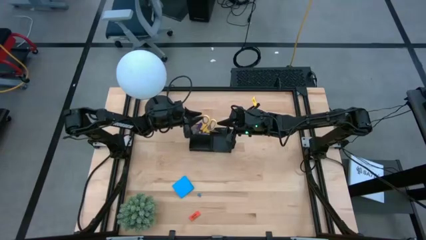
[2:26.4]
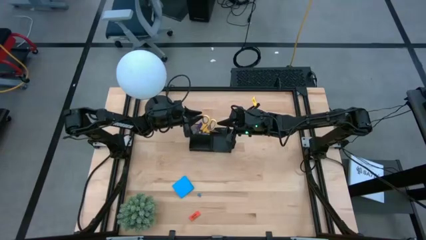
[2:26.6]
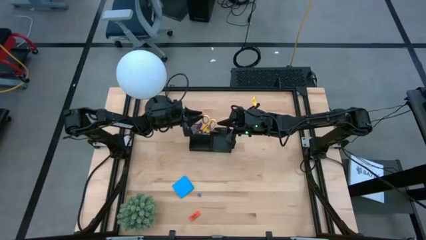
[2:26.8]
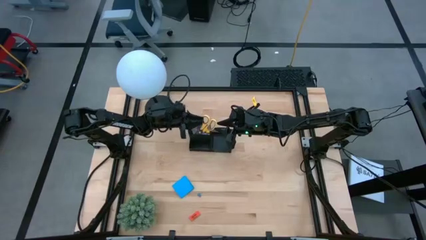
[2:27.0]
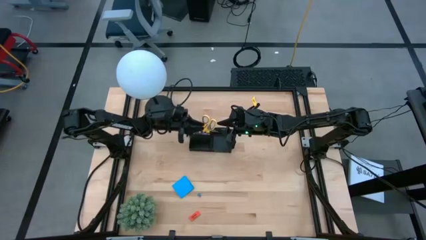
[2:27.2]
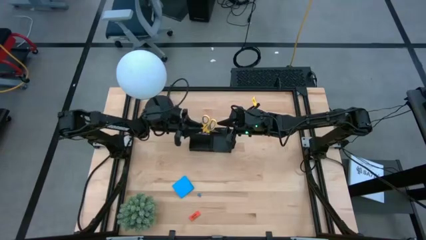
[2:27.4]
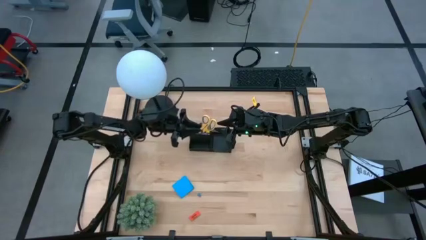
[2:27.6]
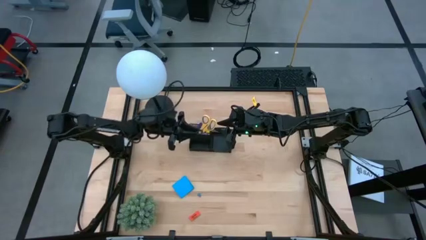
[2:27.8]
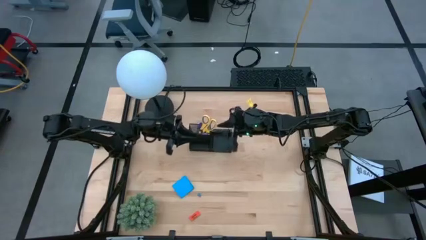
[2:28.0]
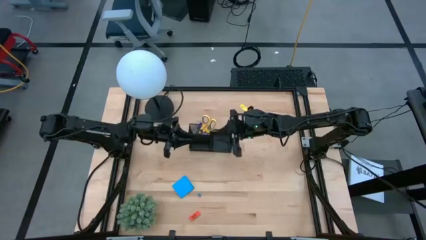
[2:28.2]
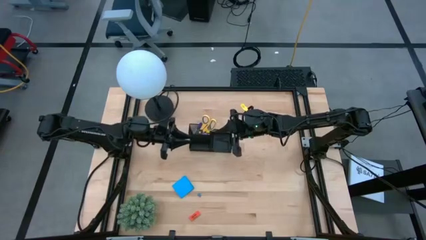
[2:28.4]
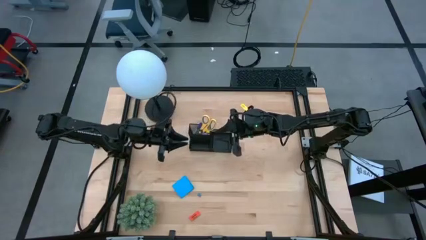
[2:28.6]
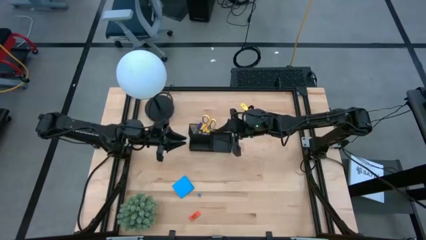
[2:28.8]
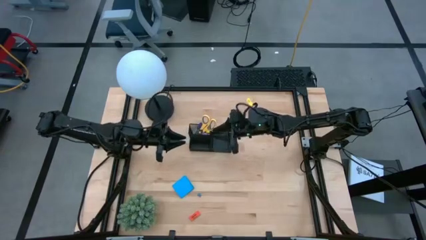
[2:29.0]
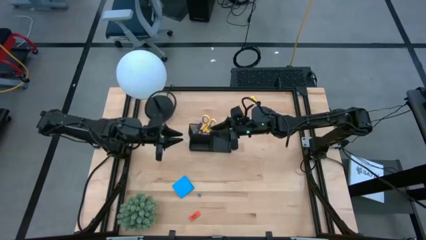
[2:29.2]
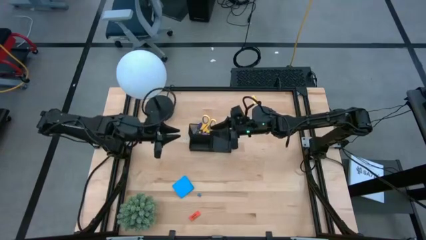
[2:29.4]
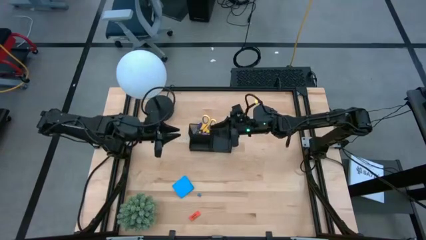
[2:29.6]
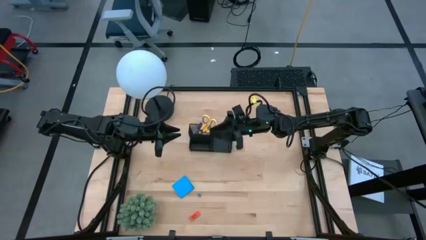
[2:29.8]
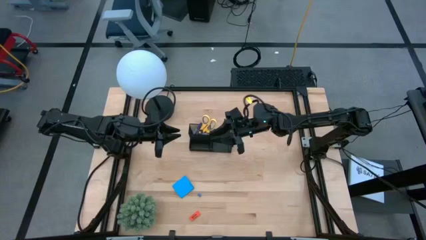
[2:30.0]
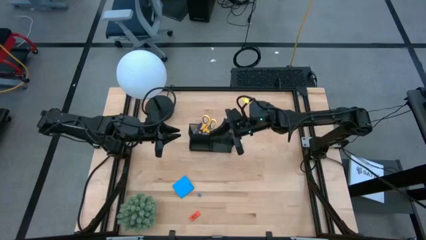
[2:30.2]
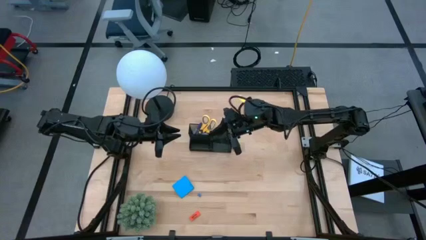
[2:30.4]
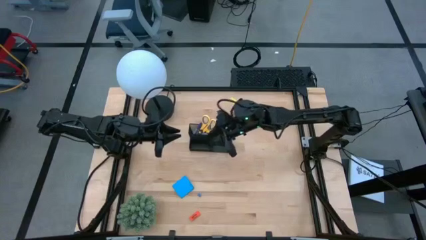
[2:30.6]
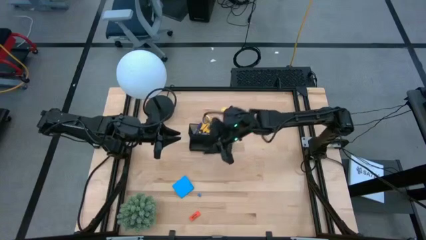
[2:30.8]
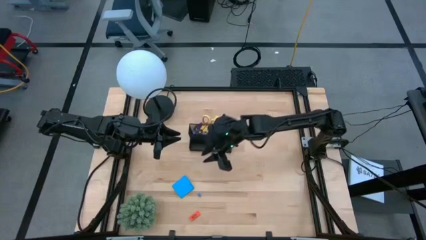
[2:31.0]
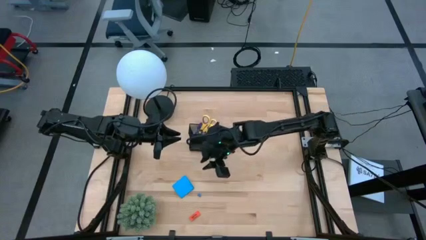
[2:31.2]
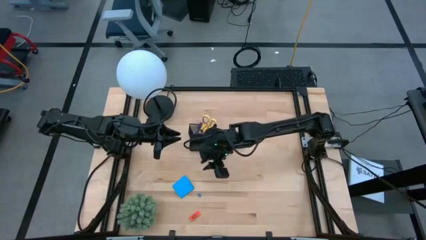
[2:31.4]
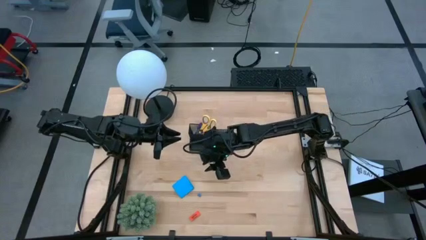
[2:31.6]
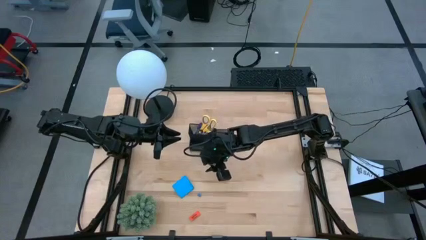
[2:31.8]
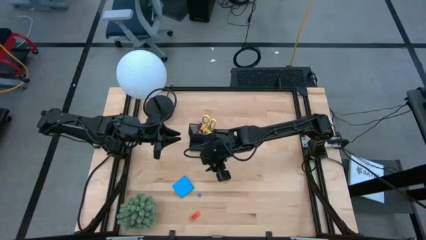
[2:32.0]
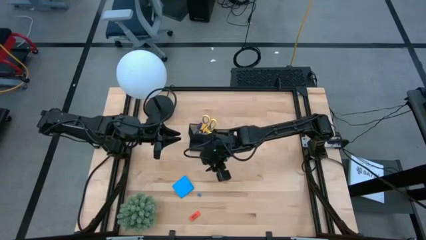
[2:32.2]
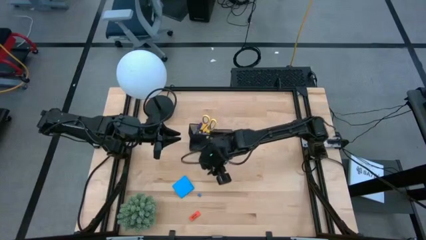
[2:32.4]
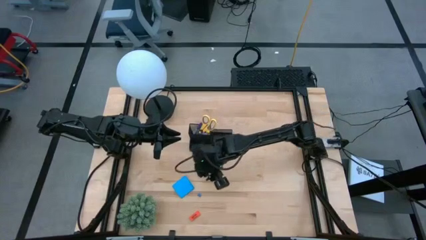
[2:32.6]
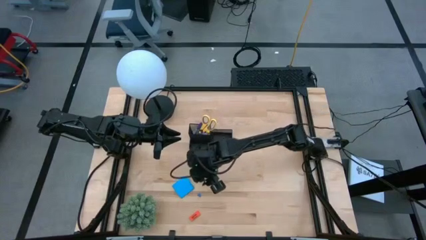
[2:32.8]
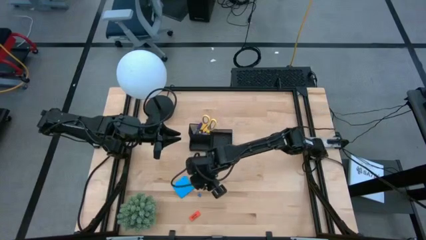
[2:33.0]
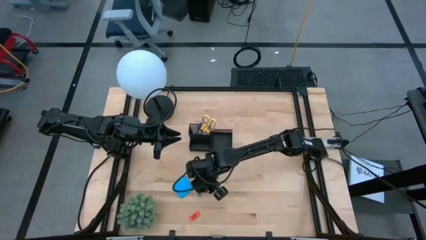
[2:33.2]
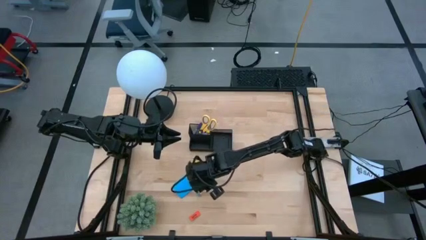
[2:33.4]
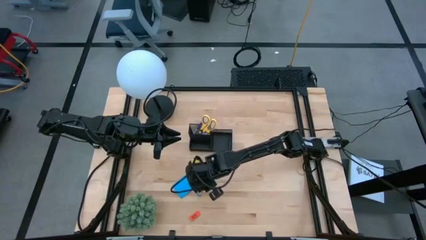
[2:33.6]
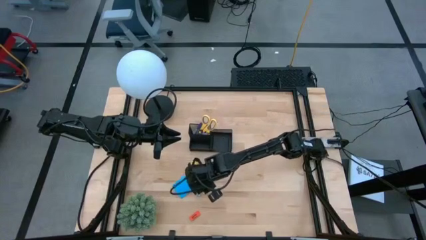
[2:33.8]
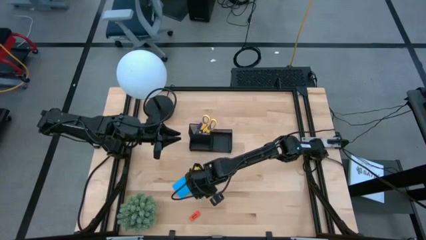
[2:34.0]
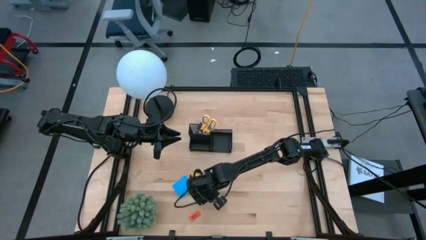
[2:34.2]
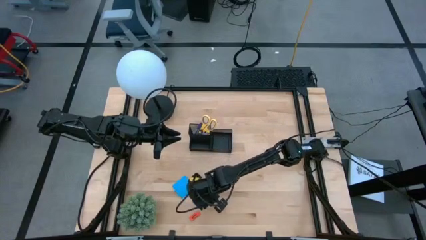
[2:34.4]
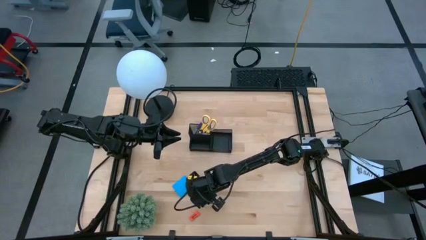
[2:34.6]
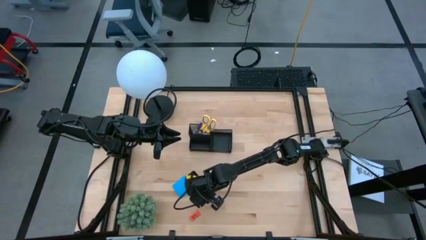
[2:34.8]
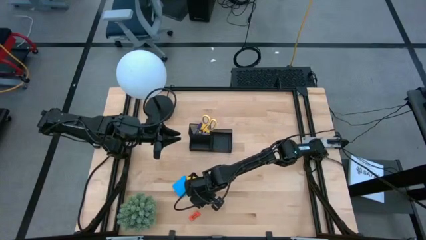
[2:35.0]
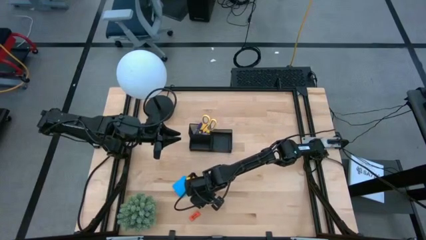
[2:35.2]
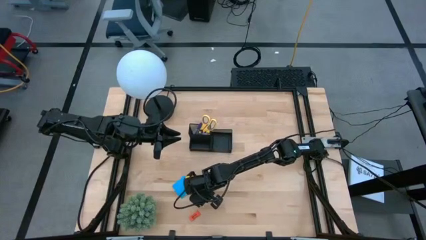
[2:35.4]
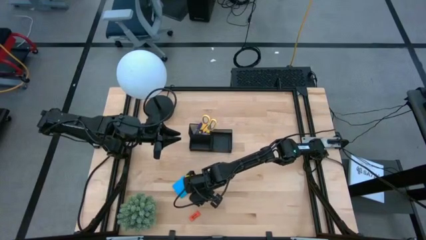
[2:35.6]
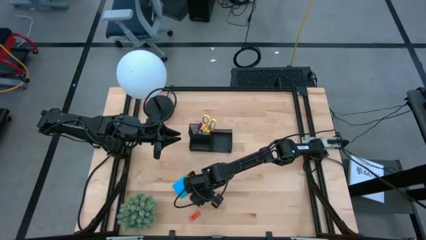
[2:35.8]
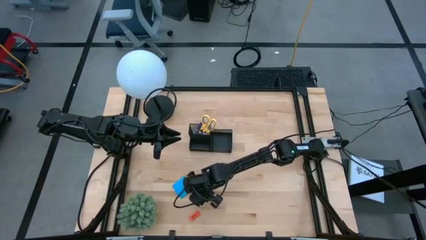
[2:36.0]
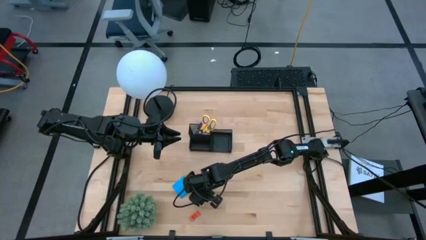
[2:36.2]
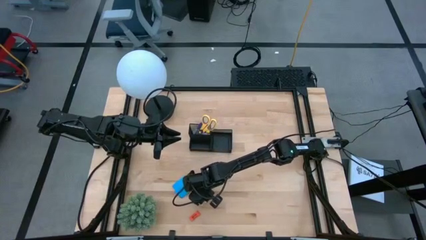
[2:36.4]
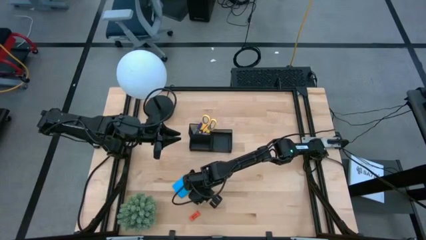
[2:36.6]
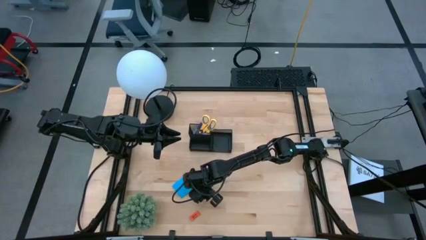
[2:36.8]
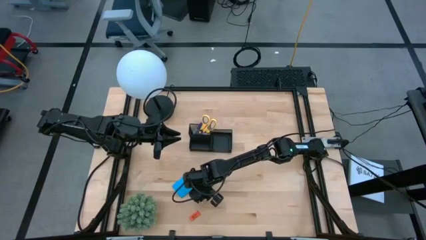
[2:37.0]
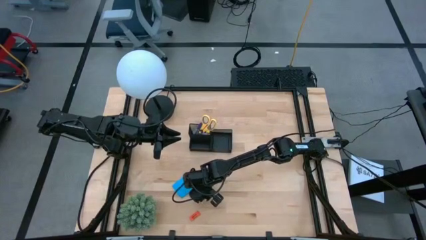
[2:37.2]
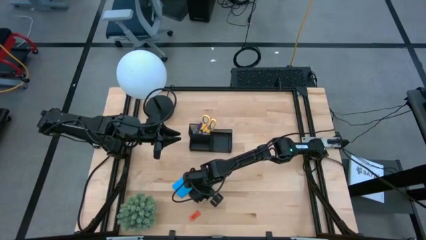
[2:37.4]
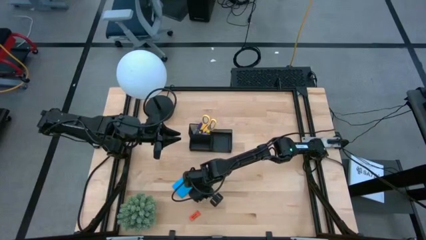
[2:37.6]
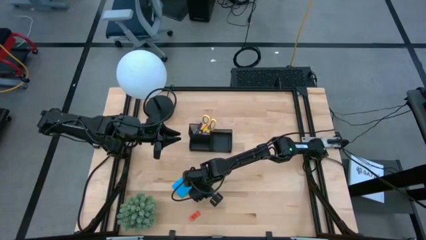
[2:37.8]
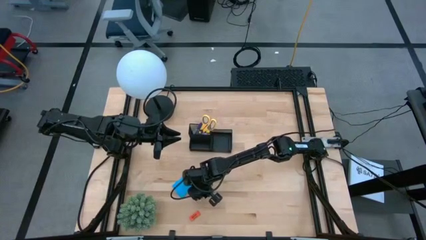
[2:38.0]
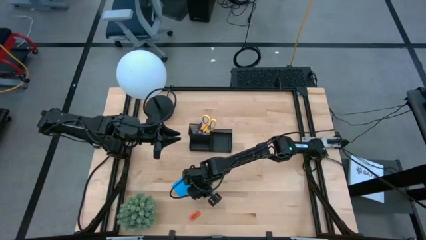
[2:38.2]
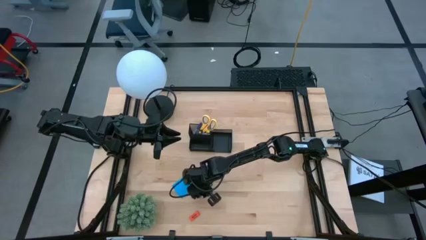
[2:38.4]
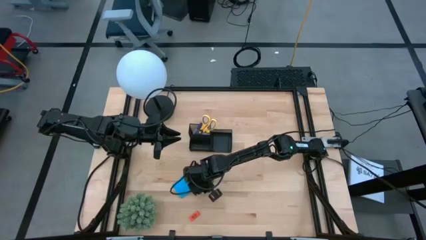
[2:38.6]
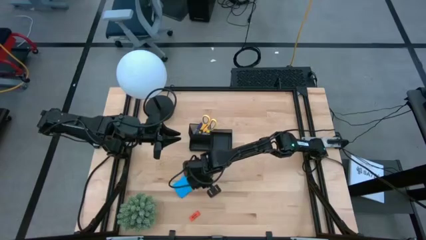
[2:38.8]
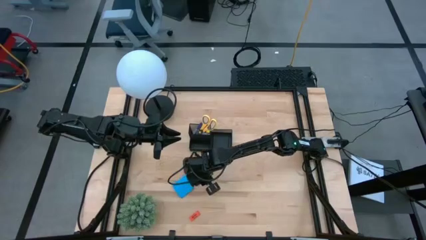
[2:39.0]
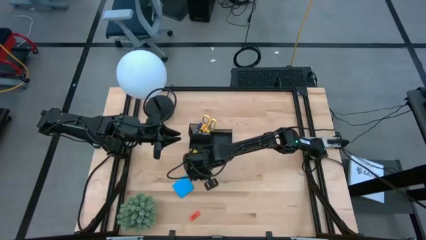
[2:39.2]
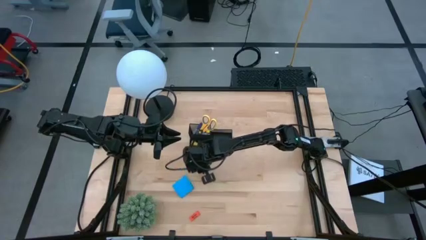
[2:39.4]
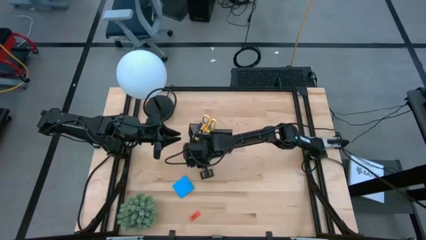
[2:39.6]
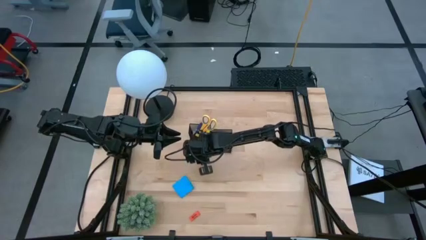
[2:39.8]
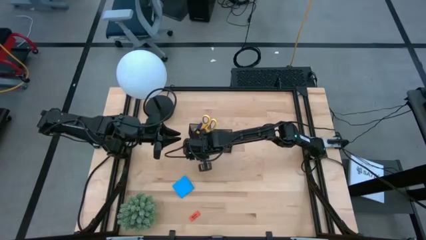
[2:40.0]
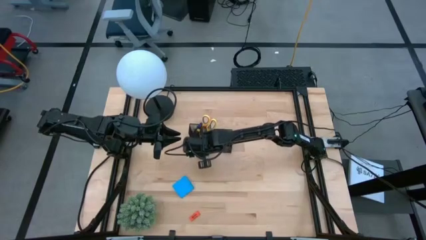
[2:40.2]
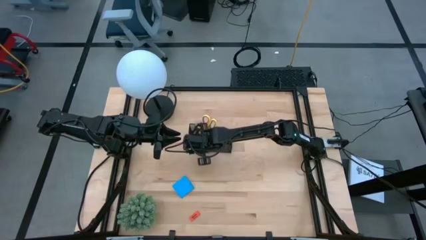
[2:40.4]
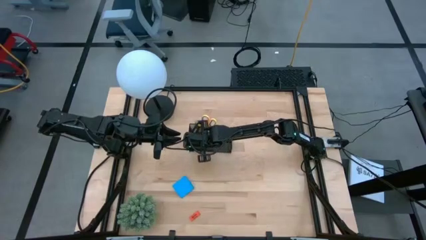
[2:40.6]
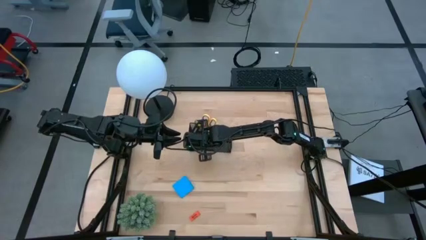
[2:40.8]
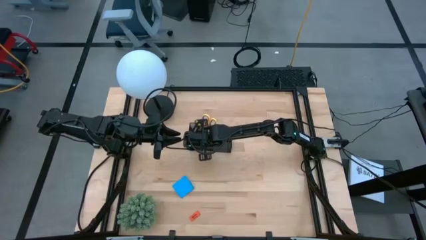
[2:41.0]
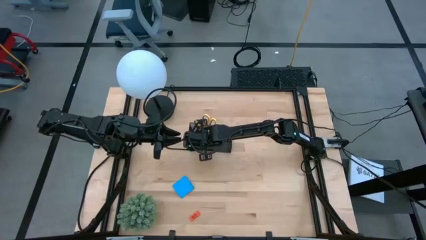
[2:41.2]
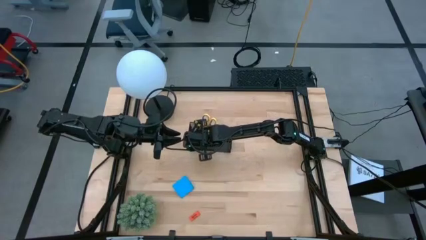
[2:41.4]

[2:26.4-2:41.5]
Task: Pick and place office supplies into organizer
Put the blue binder clip into the black desk organizer

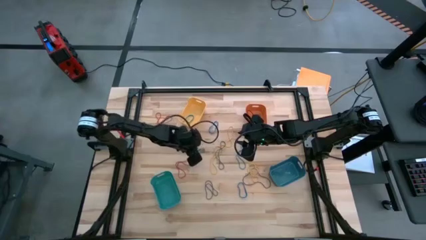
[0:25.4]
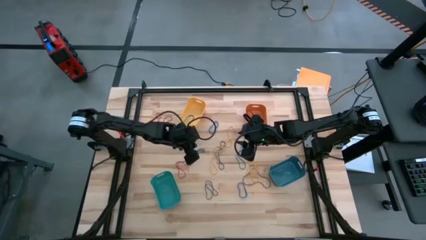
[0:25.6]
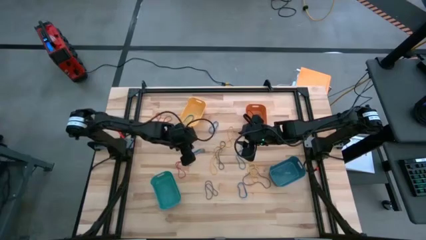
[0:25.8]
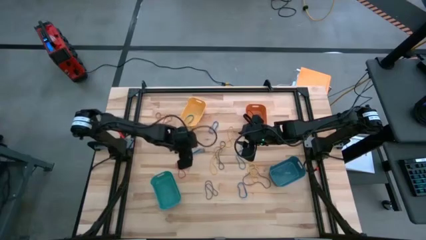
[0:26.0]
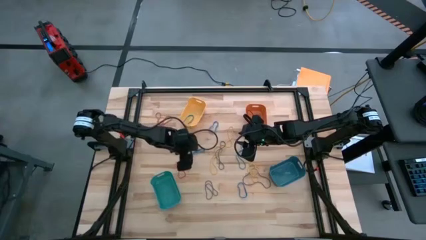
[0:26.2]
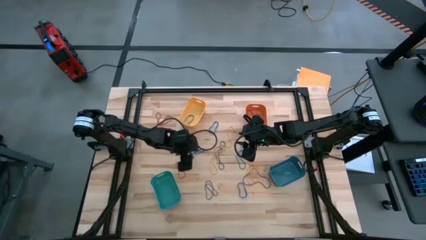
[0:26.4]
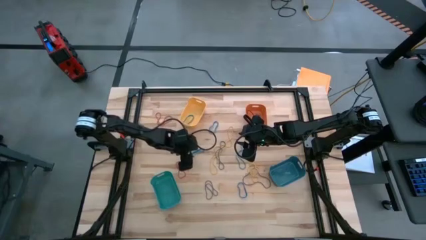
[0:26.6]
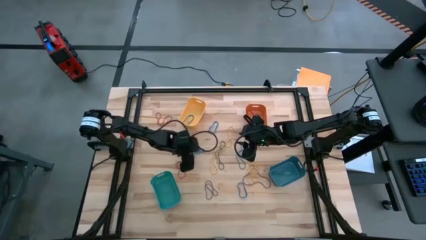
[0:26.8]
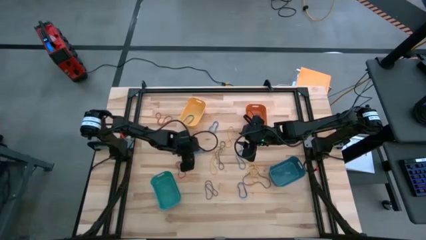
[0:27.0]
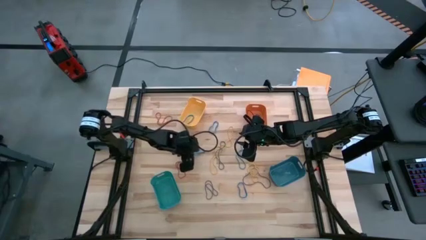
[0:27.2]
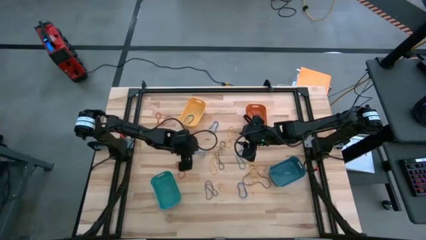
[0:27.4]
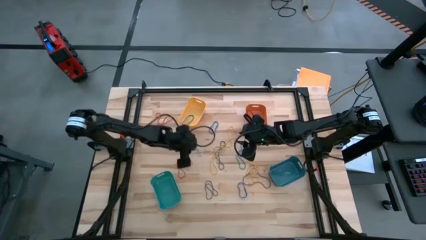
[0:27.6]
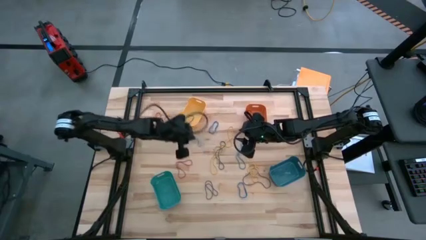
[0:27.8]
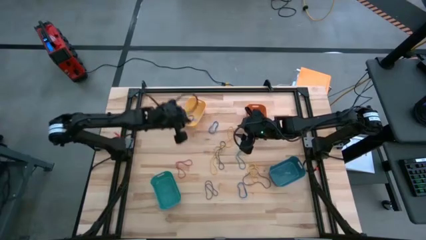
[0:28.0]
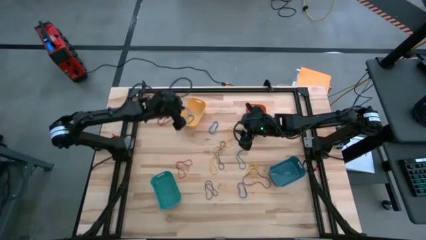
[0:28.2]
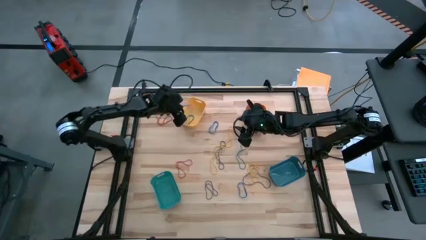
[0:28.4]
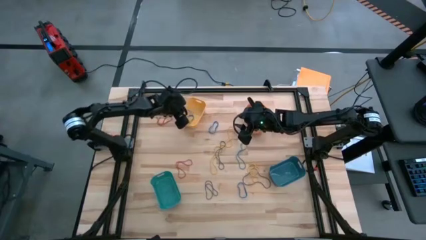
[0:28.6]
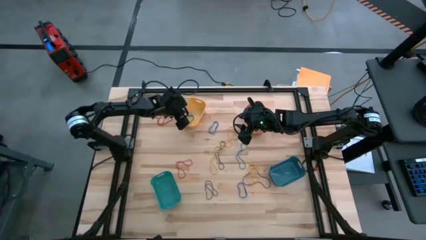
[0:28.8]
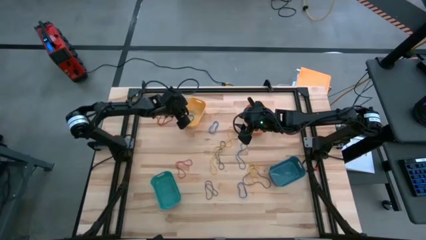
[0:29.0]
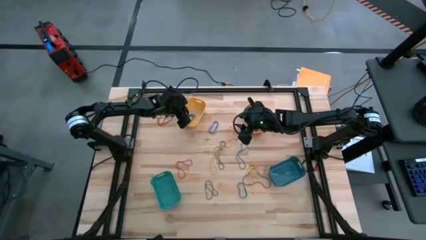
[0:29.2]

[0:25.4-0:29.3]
Task: Sort rubber bands into baskets
Put the blue rubber band into the yellow bin
